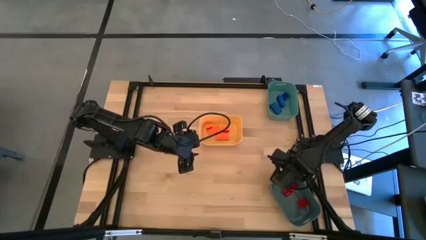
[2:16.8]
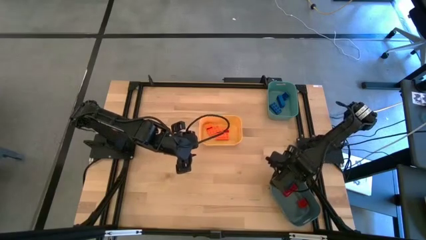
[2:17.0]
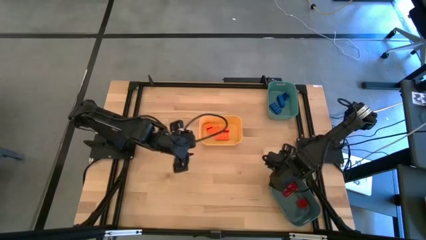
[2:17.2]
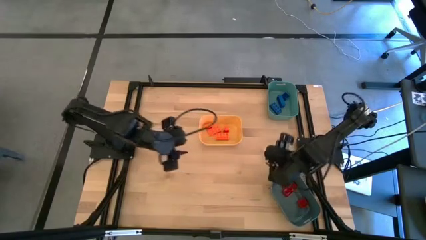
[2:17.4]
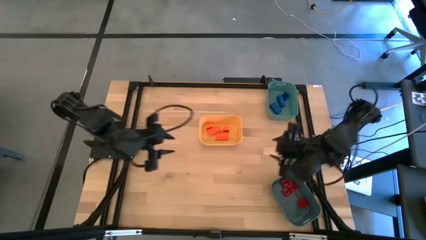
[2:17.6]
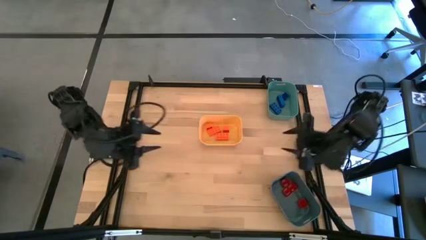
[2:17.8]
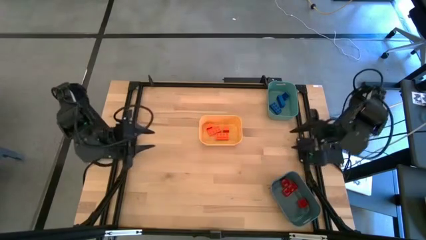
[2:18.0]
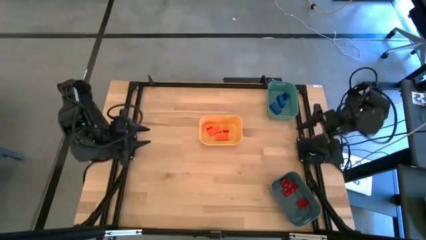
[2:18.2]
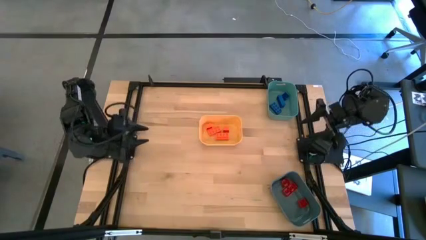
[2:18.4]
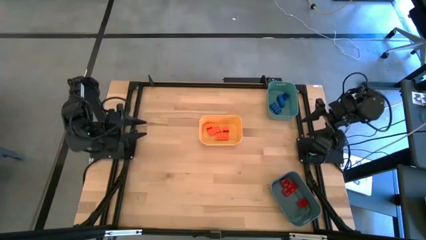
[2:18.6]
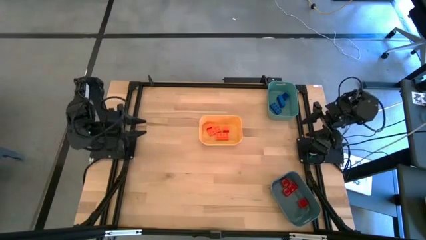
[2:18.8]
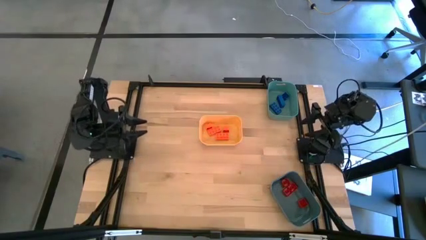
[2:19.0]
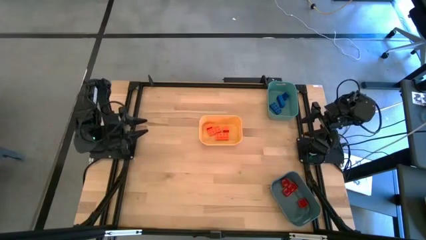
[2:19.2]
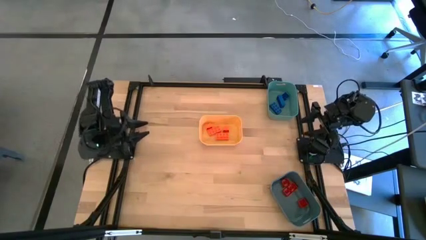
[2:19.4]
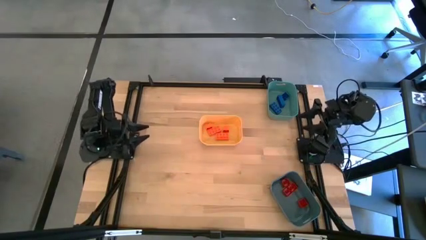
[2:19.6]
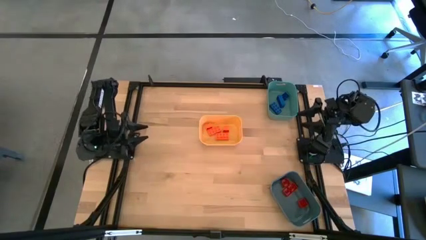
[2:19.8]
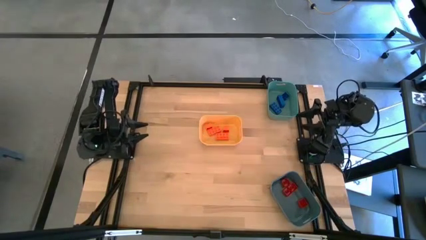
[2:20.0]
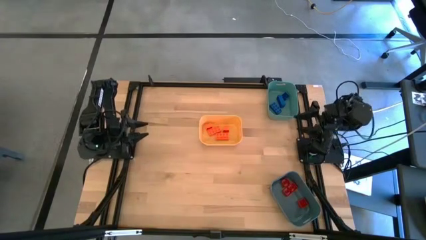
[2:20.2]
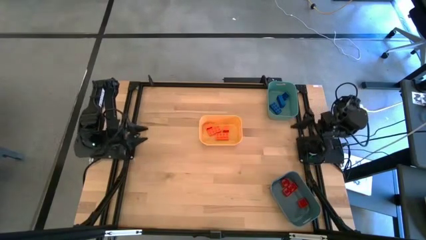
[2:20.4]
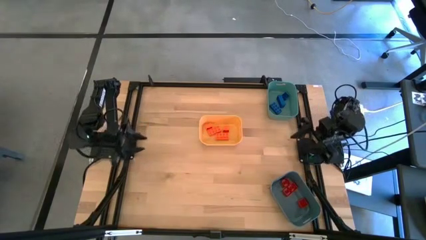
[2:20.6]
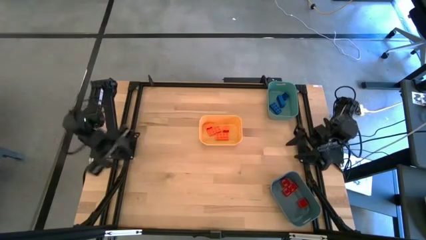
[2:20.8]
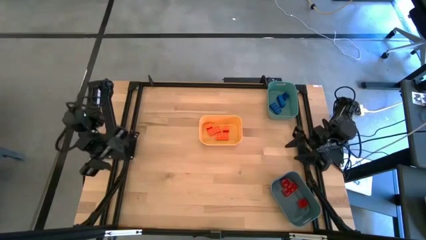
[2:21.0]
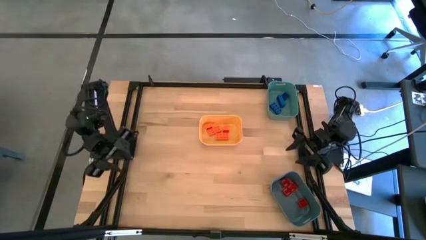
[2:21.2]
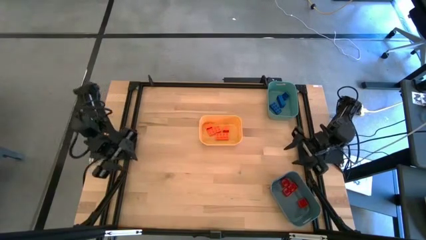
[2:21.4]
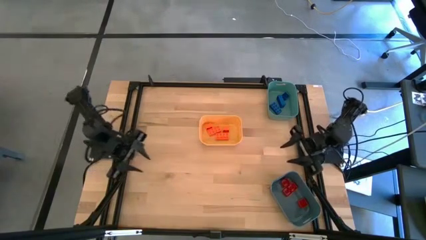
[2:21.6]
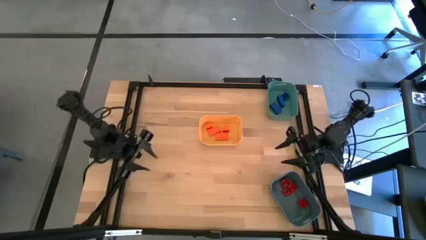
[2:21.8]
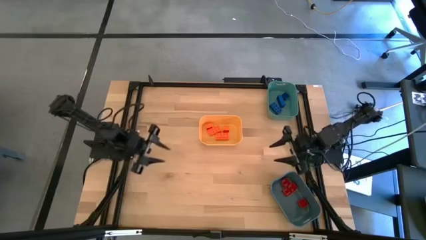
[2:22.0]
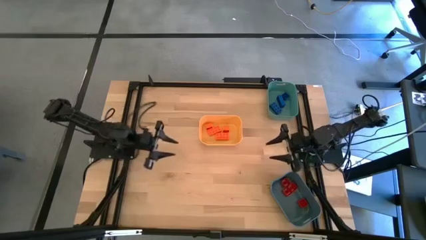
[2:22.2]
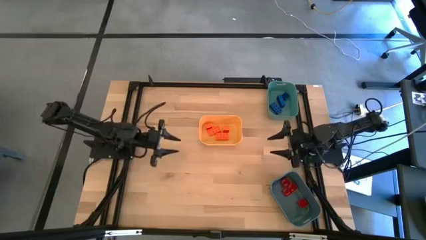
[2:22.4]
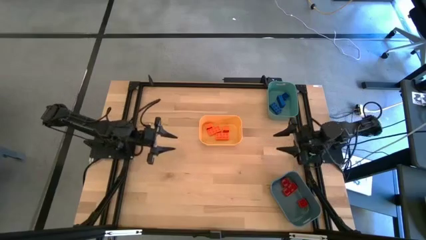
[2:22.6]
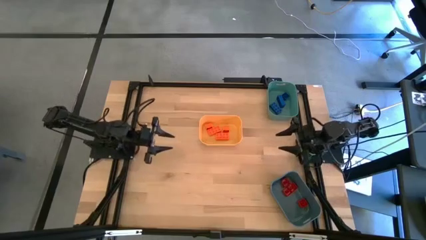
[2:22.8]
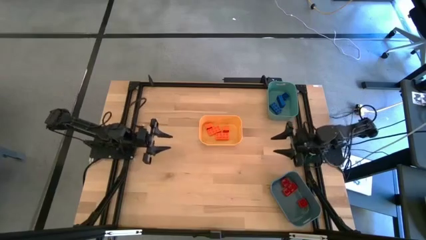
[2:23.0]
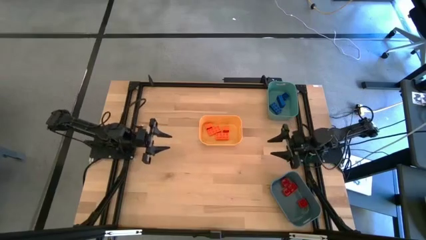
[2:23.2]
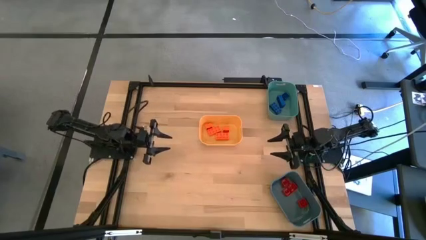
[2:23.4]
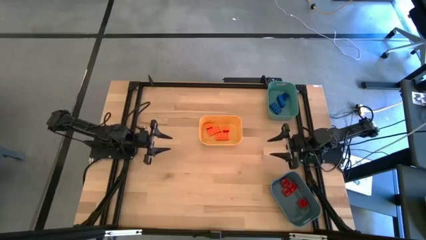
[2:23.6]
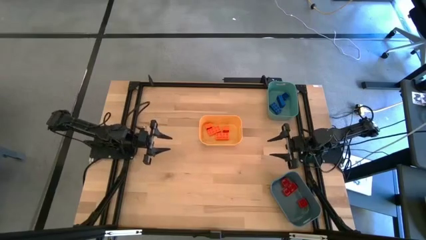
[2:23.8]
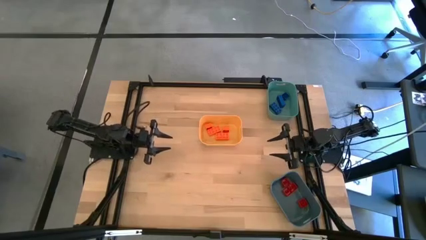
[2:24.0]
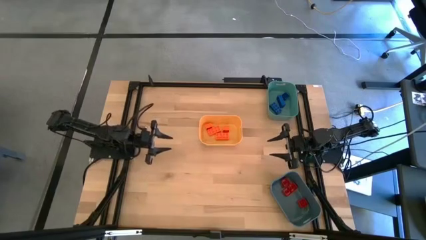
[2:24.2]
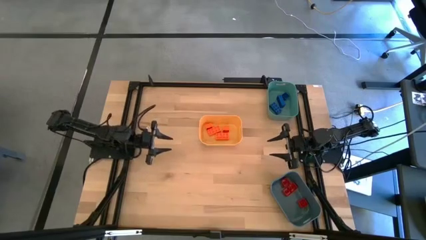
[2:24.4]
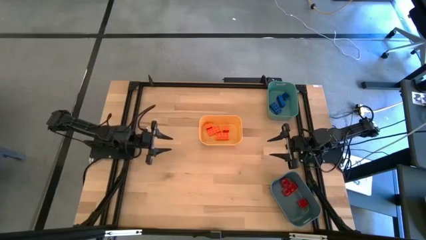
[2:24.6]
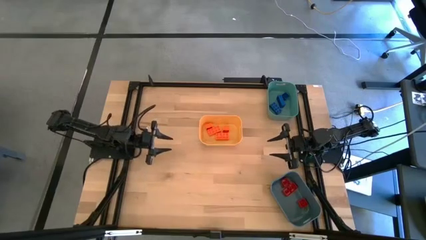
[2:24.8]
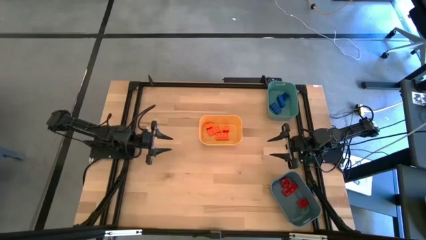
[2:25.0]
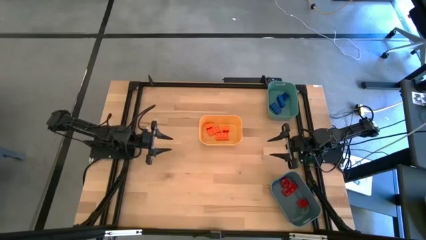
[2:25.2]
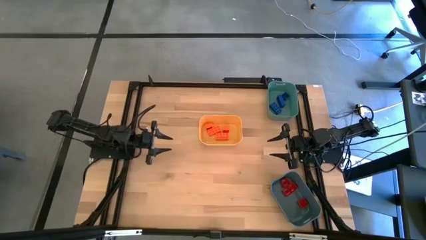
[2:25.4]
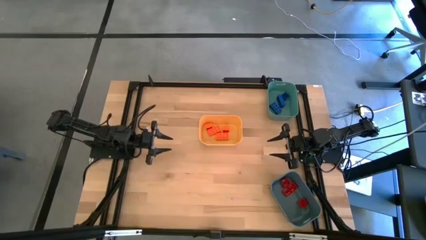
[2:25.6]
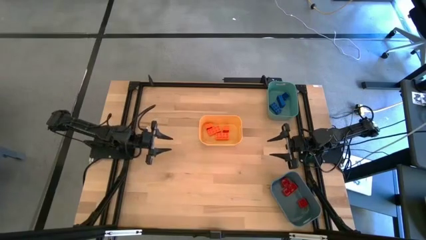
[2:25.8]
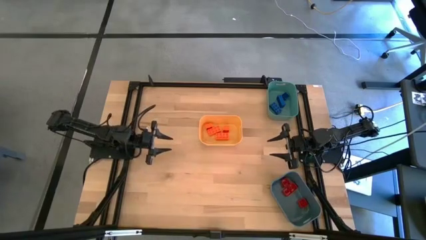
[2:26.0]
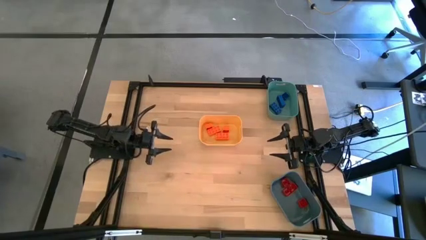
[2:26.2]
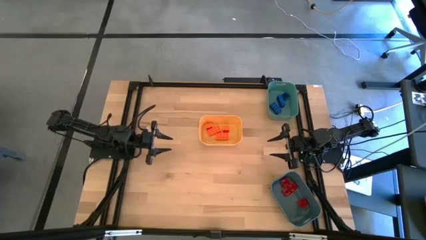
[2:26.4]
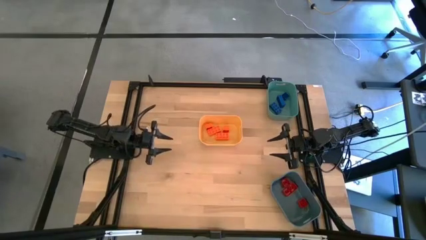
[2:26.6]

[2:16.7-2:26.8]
Task: Sort & place blocks by color
Return to Home Position
